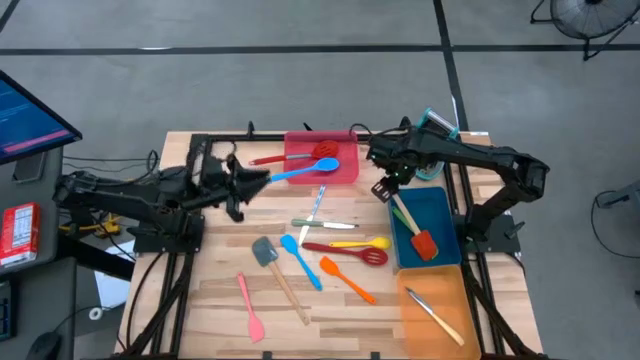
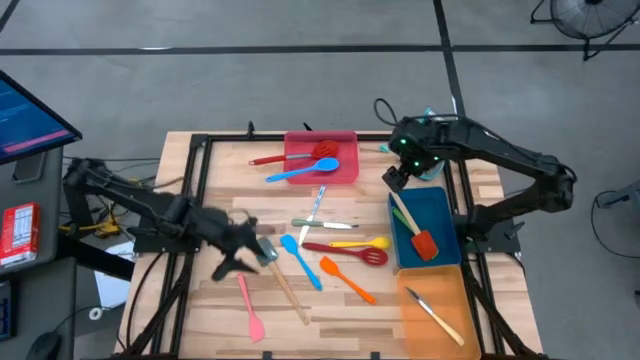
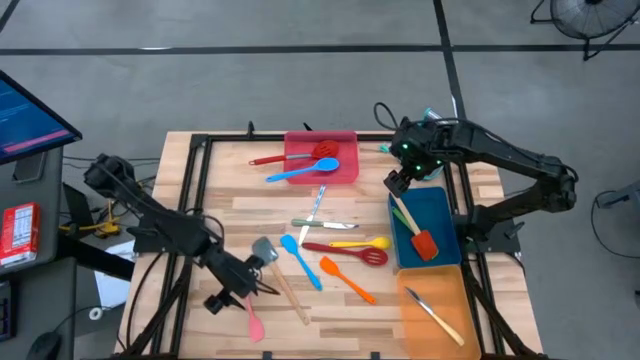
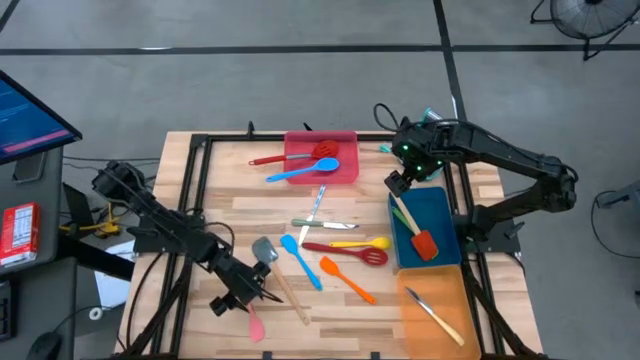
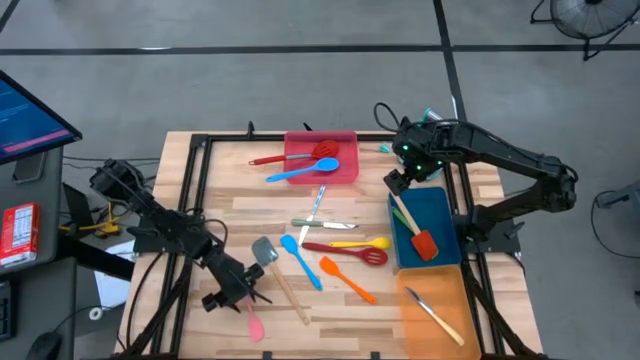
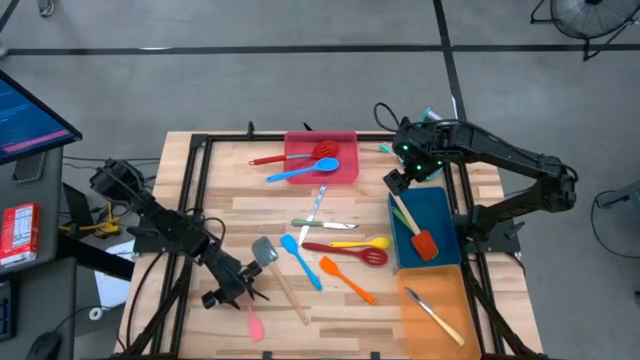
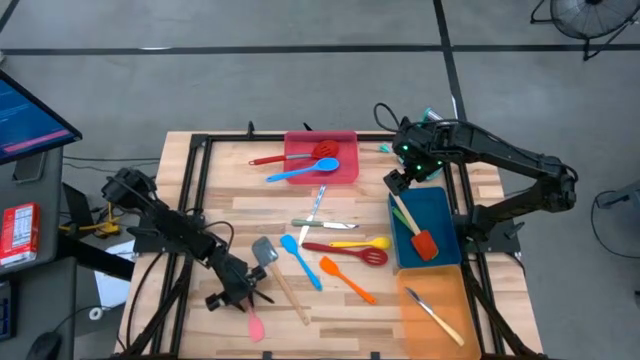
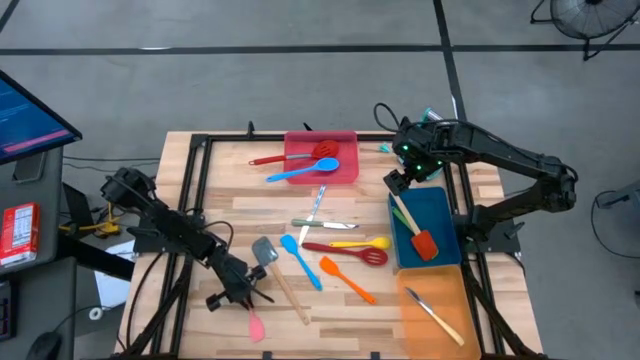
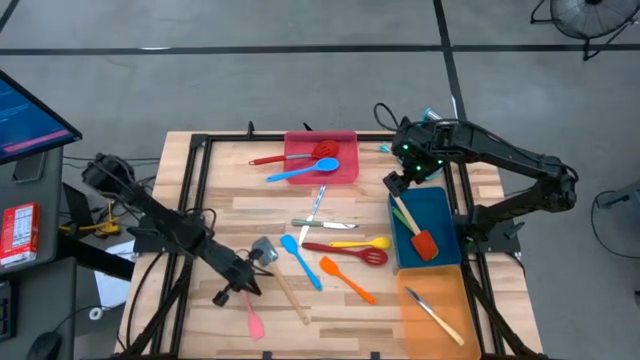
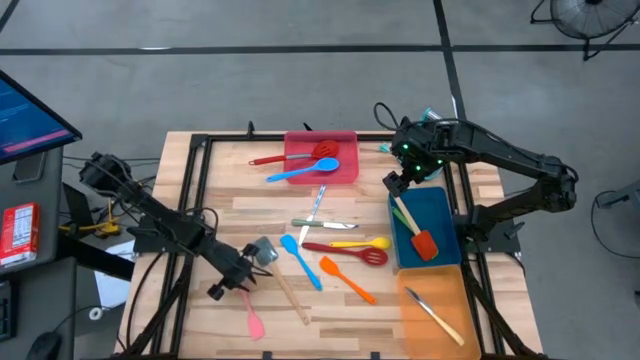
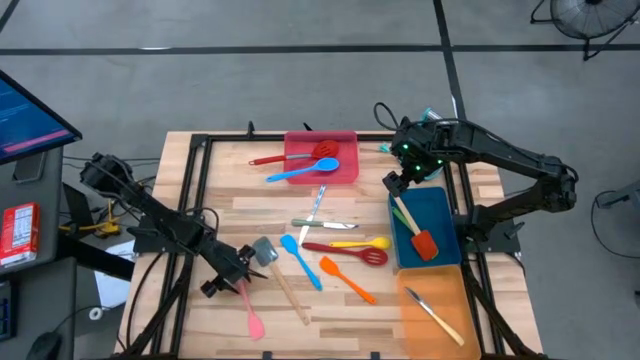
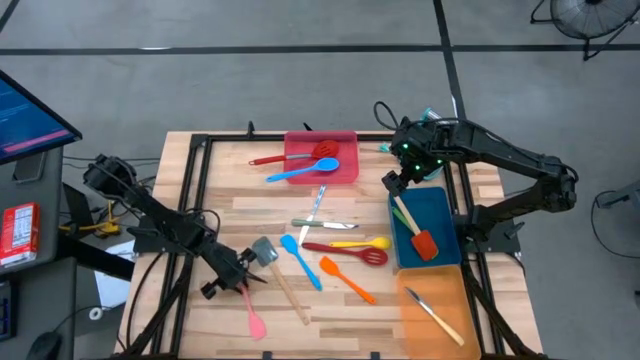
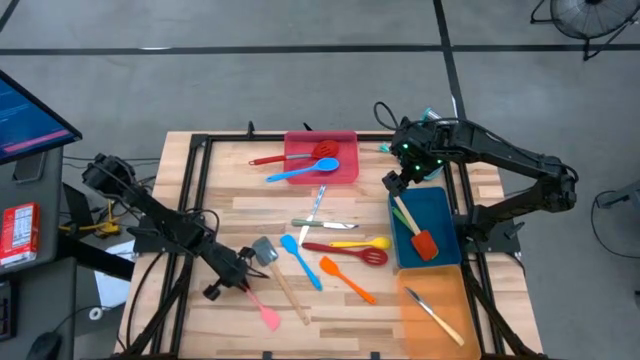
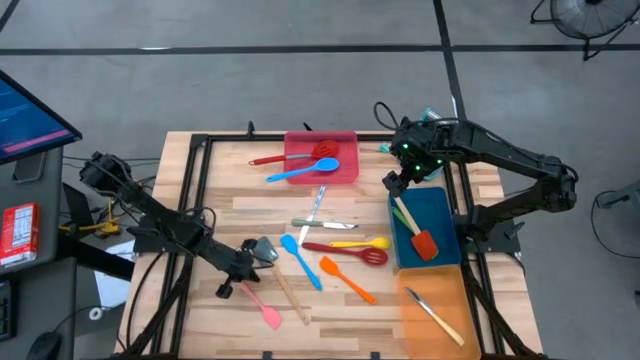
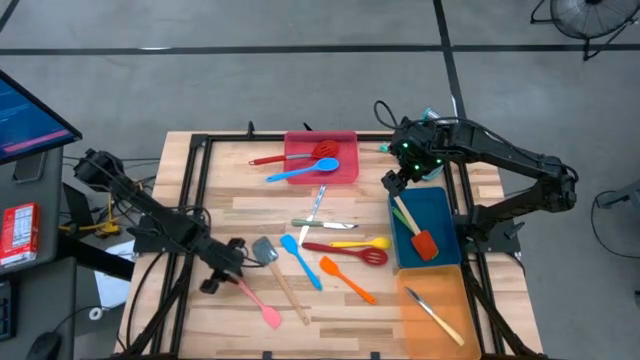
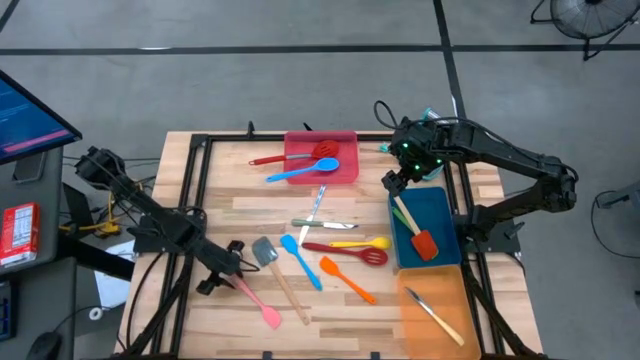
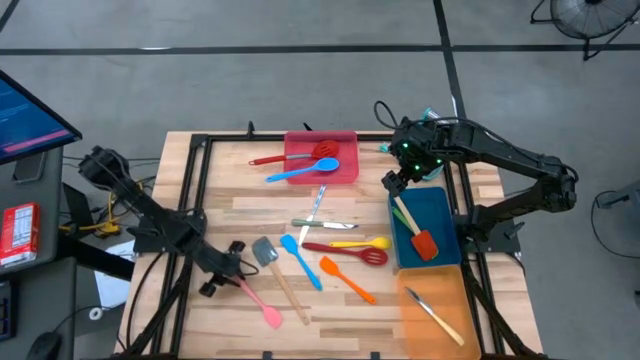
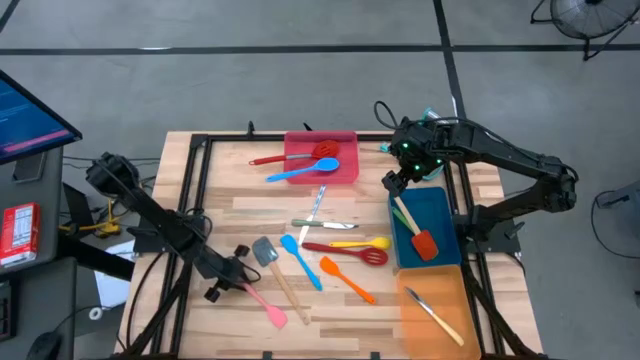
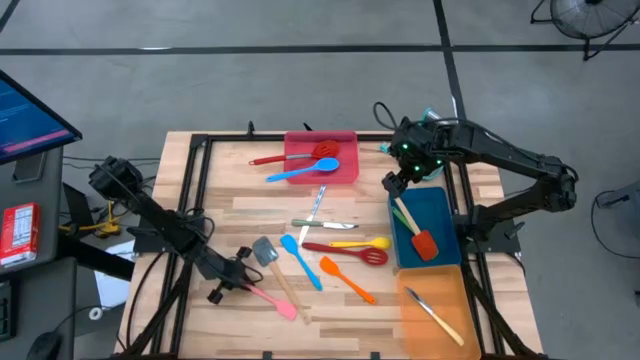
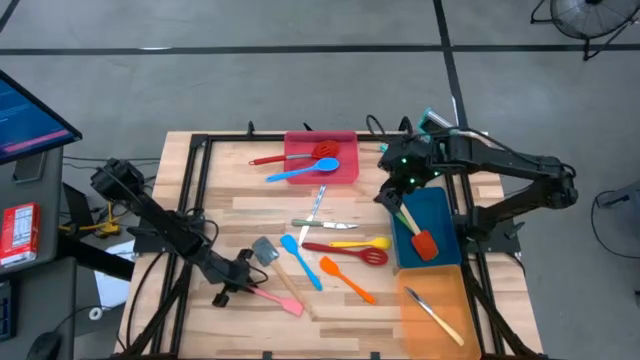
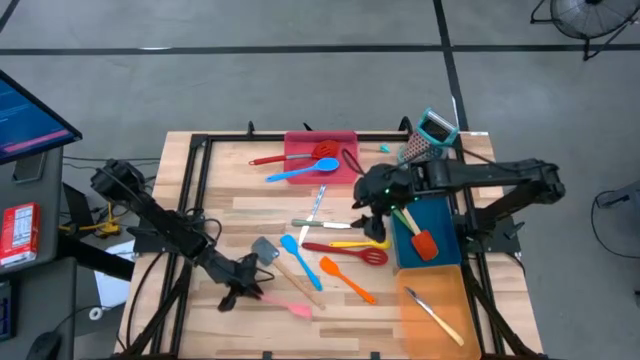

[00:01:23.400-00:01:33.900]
Task: Pick & Place Kitchen Items
Put the pink spatula into the blue bin

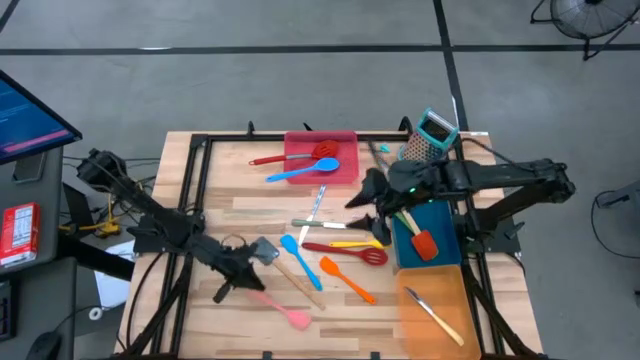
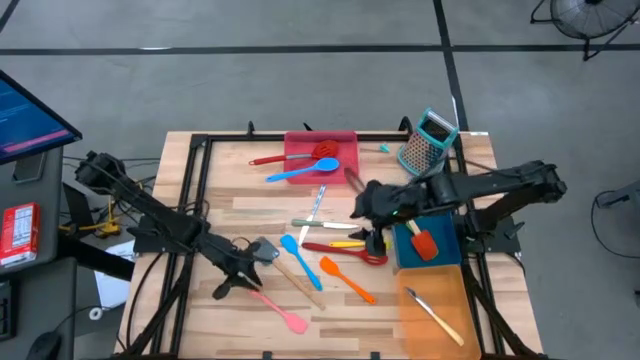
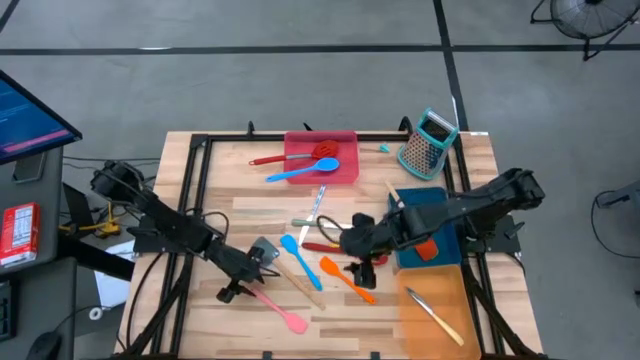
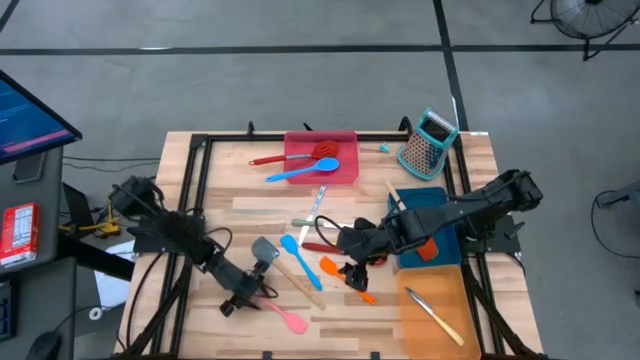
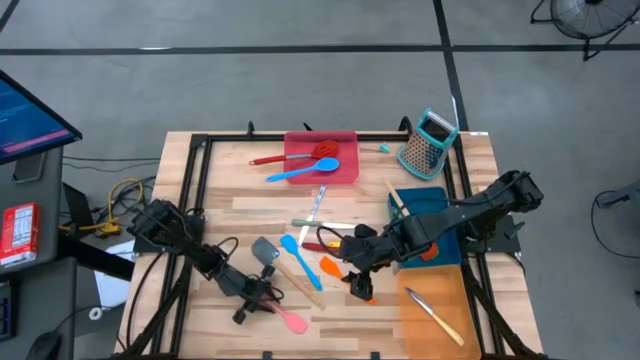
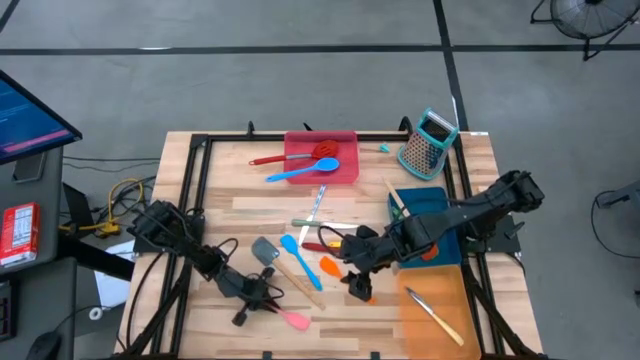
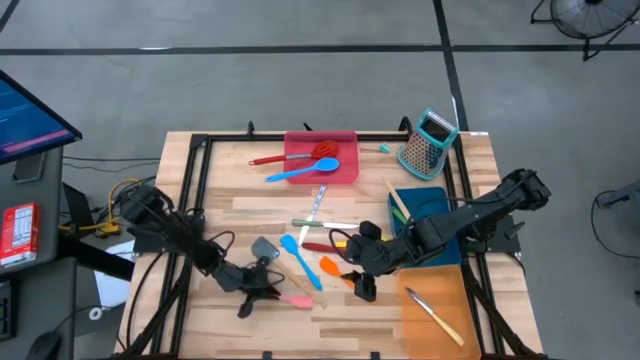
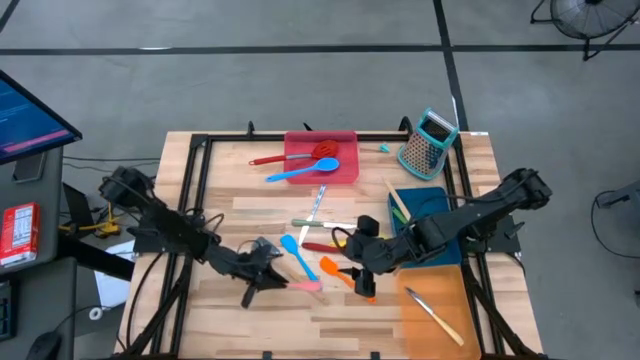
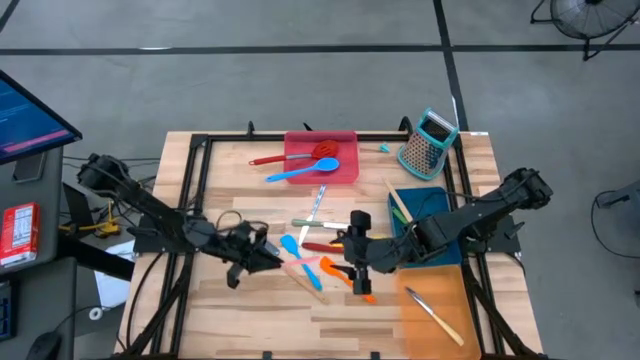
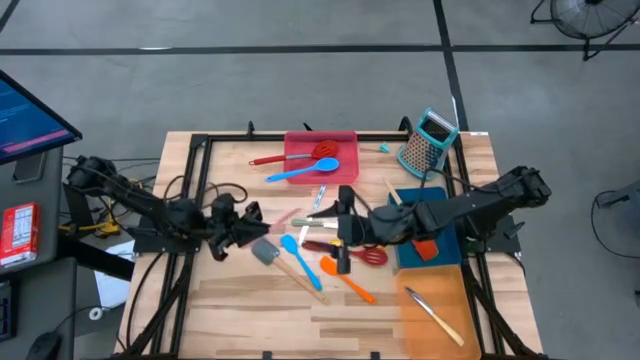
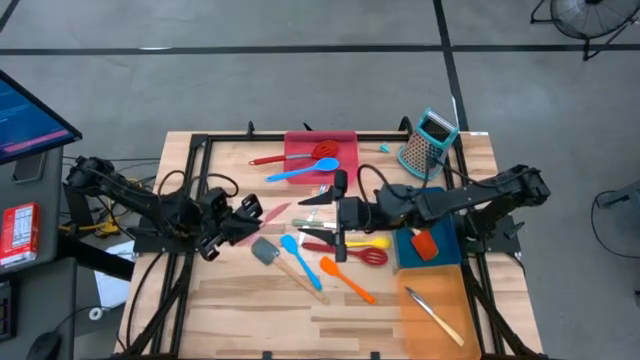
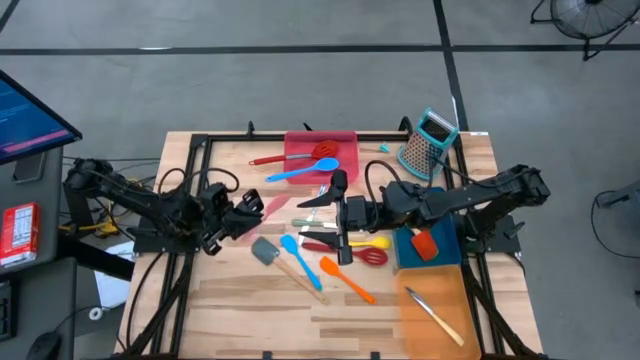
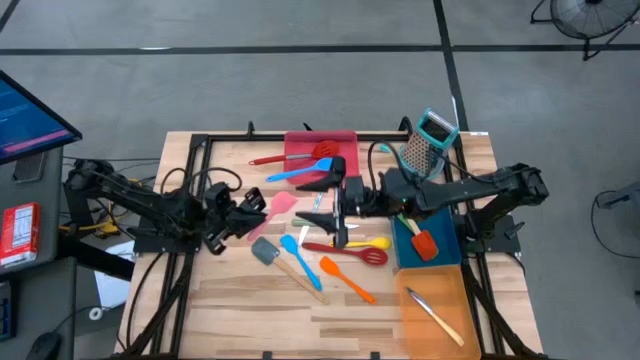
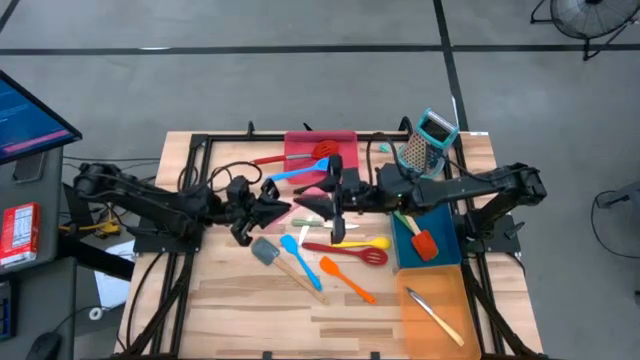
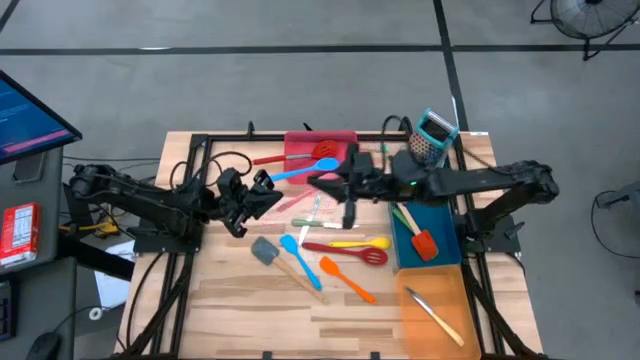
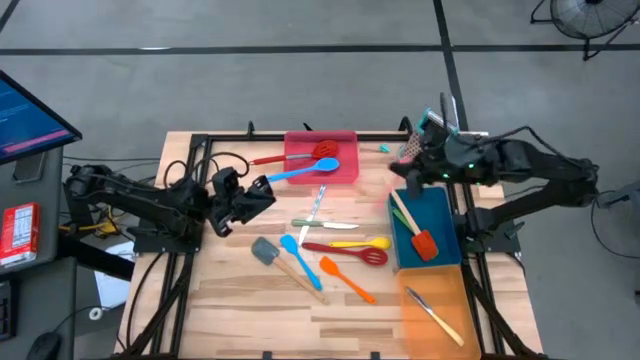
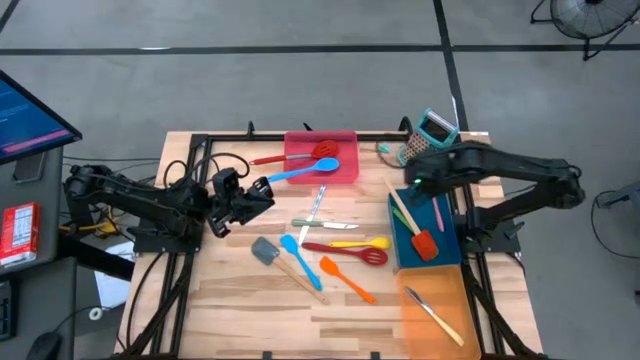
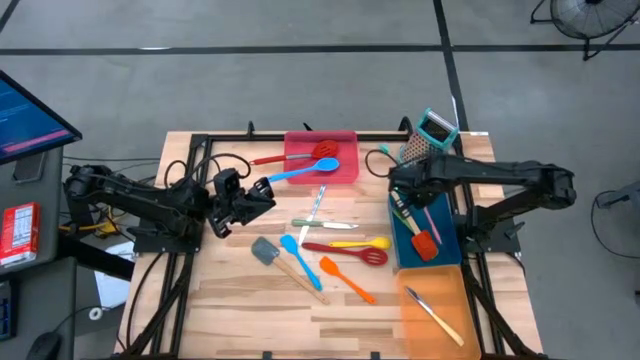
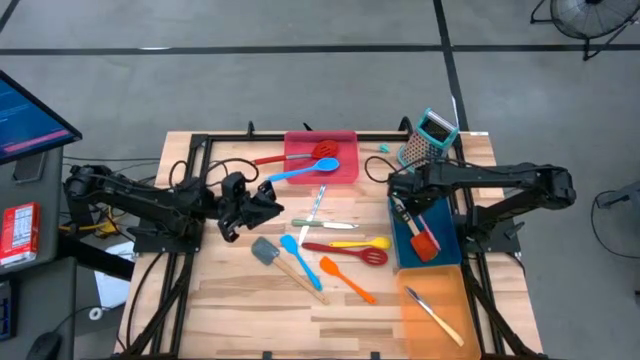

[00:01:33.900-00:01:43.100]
Put the pink spatula into the blue bin
